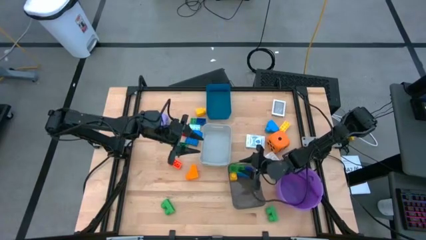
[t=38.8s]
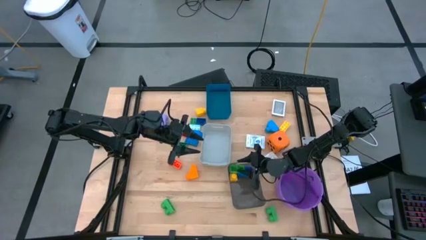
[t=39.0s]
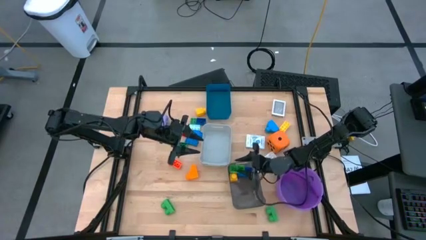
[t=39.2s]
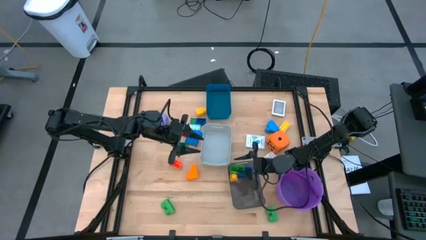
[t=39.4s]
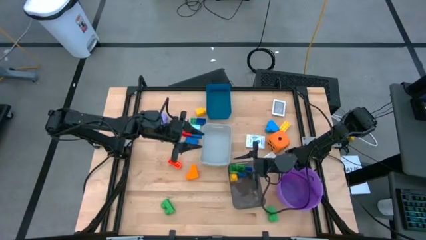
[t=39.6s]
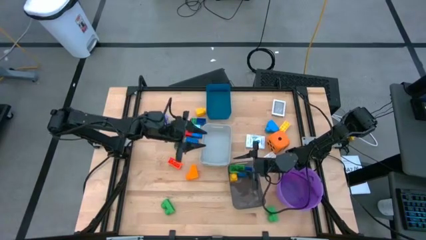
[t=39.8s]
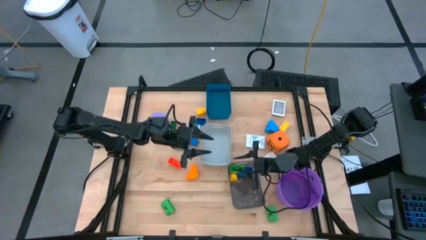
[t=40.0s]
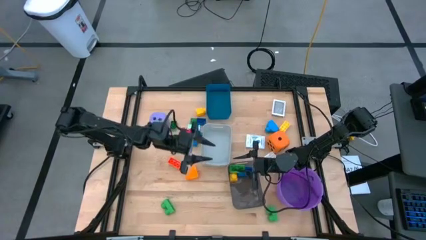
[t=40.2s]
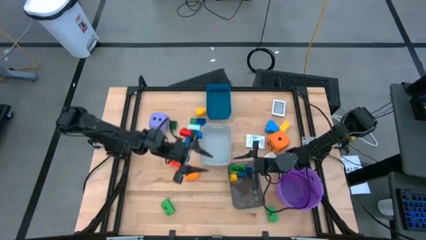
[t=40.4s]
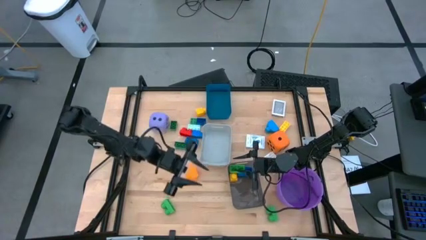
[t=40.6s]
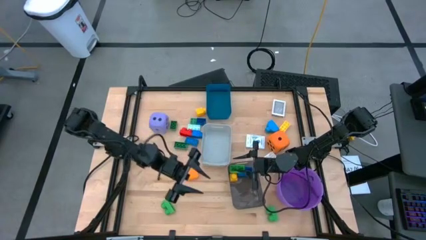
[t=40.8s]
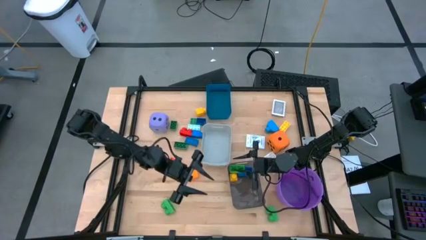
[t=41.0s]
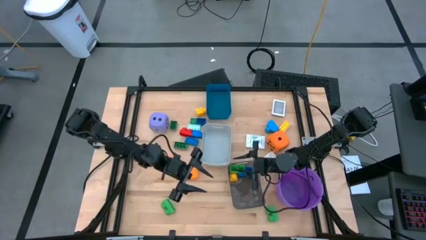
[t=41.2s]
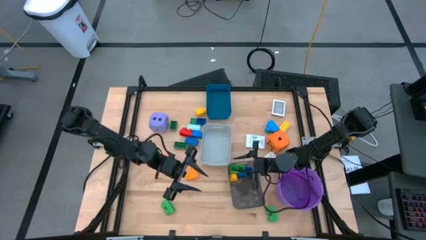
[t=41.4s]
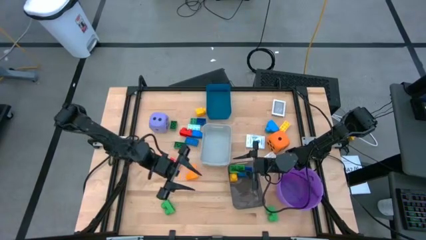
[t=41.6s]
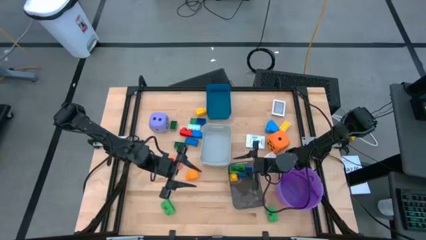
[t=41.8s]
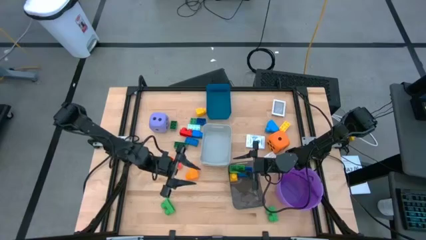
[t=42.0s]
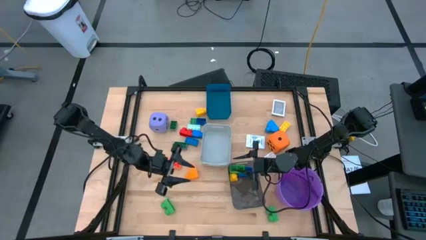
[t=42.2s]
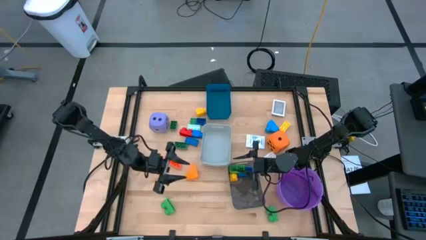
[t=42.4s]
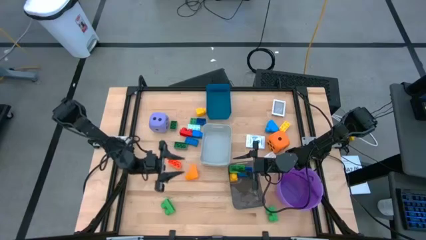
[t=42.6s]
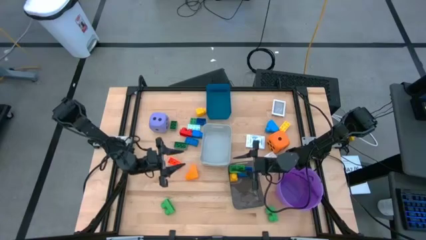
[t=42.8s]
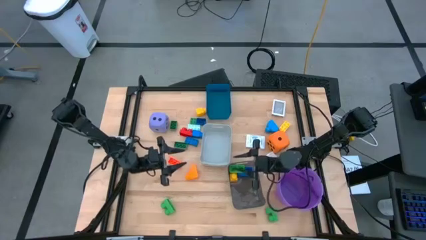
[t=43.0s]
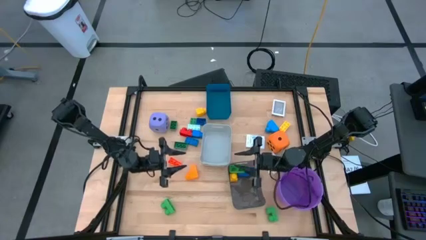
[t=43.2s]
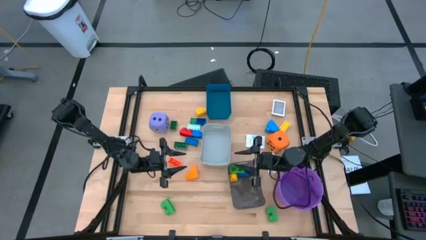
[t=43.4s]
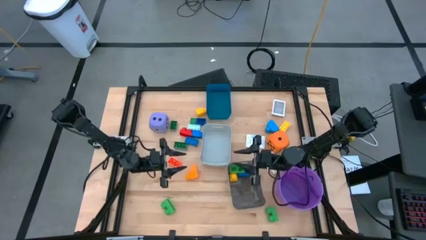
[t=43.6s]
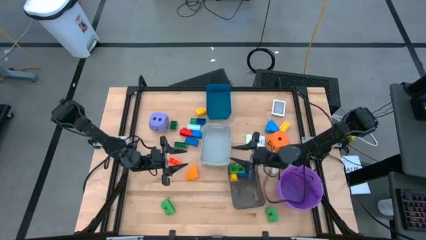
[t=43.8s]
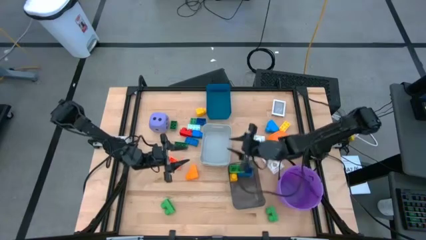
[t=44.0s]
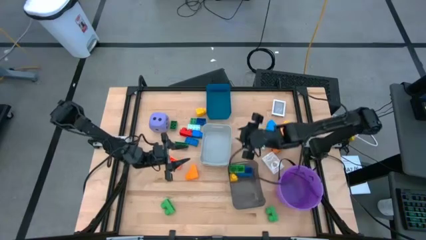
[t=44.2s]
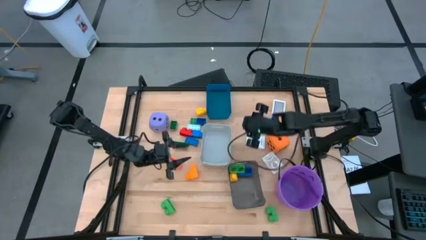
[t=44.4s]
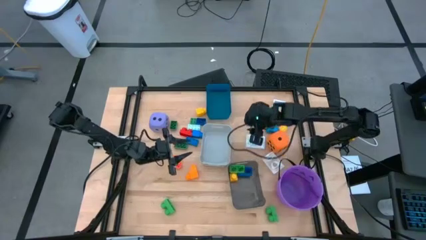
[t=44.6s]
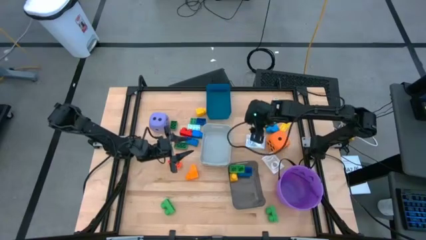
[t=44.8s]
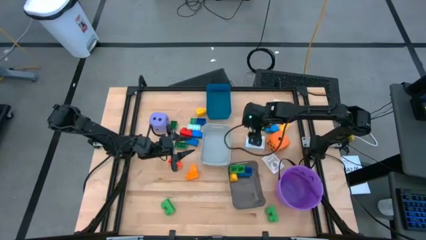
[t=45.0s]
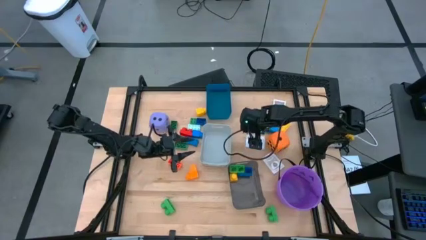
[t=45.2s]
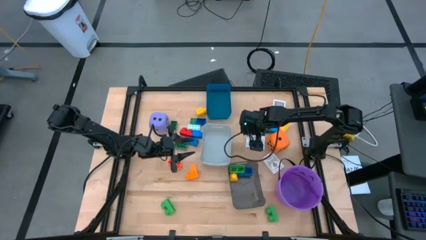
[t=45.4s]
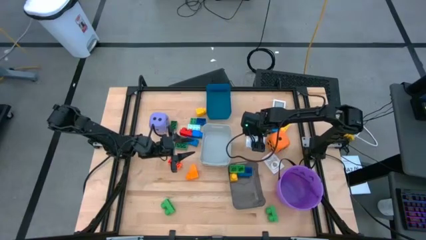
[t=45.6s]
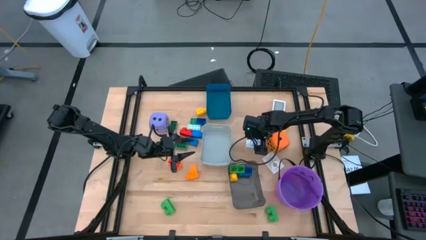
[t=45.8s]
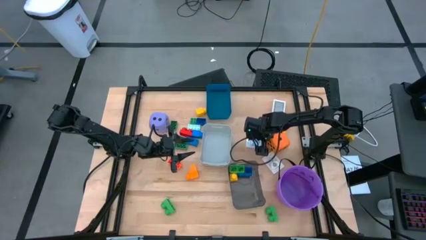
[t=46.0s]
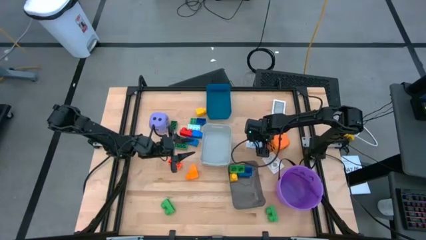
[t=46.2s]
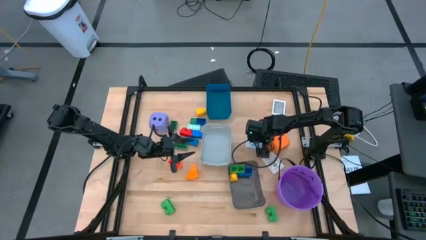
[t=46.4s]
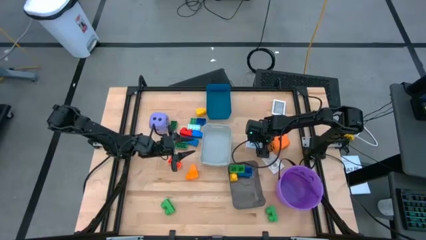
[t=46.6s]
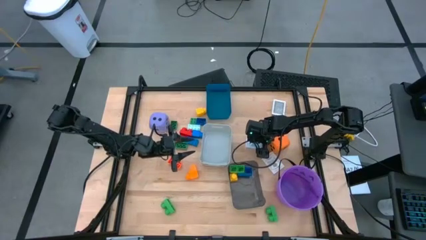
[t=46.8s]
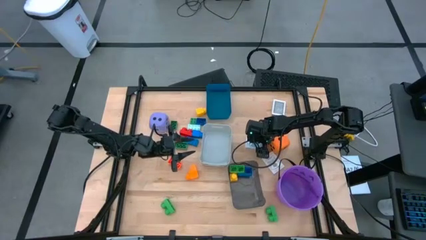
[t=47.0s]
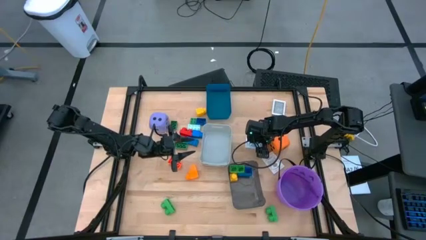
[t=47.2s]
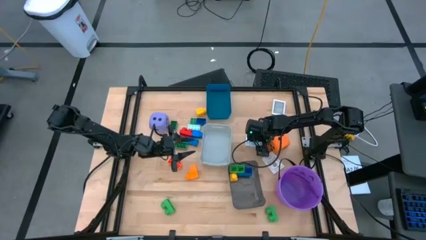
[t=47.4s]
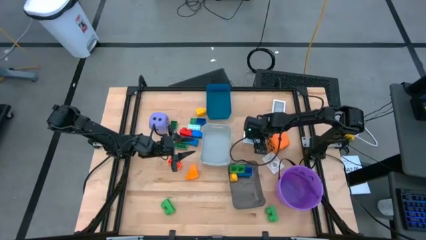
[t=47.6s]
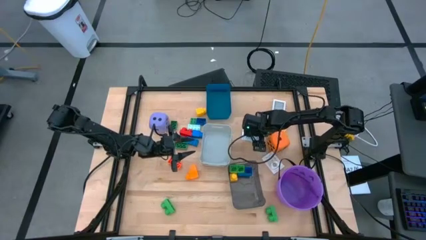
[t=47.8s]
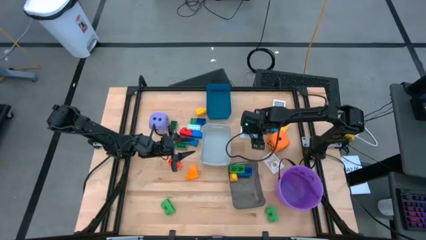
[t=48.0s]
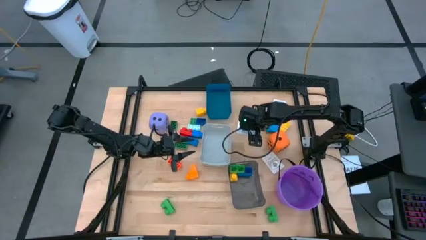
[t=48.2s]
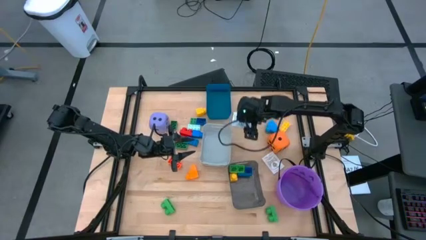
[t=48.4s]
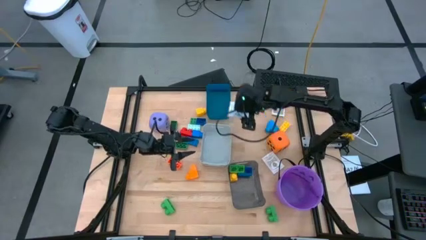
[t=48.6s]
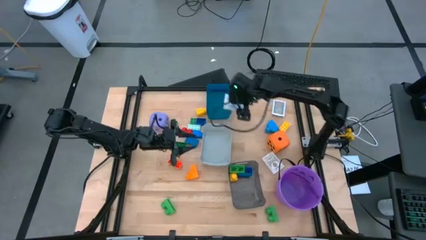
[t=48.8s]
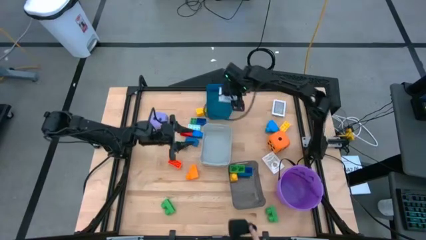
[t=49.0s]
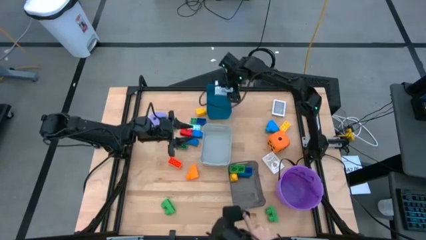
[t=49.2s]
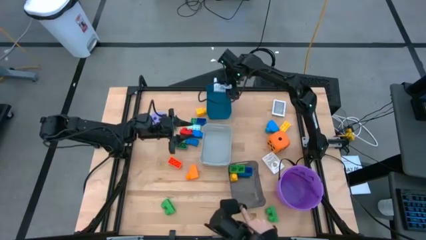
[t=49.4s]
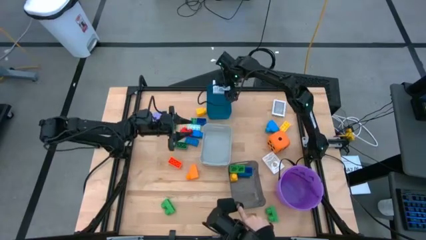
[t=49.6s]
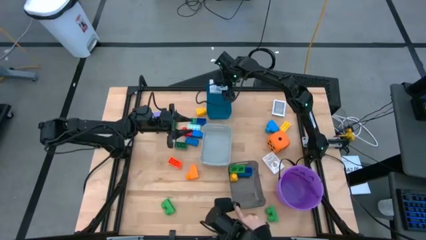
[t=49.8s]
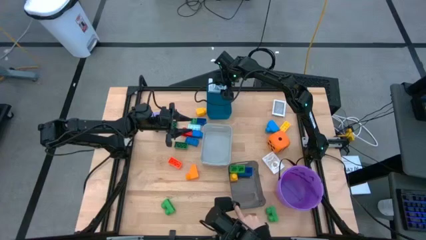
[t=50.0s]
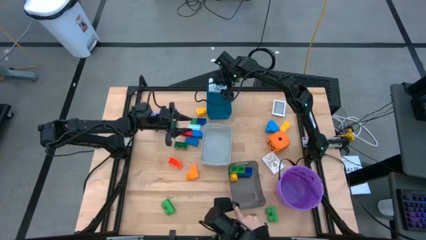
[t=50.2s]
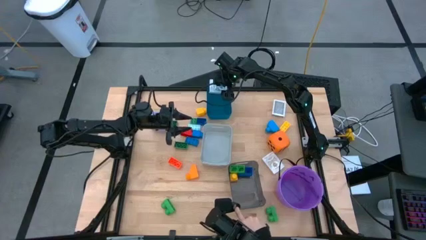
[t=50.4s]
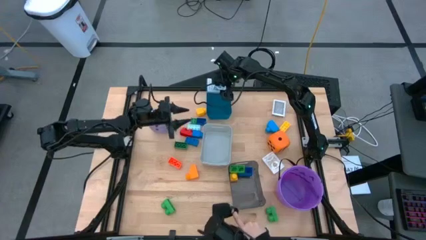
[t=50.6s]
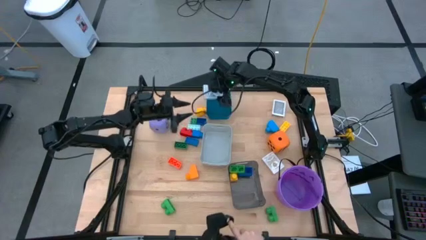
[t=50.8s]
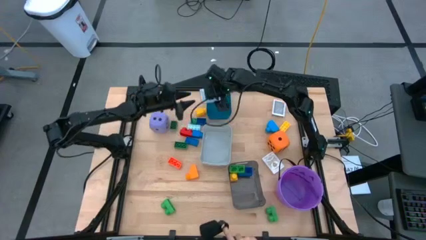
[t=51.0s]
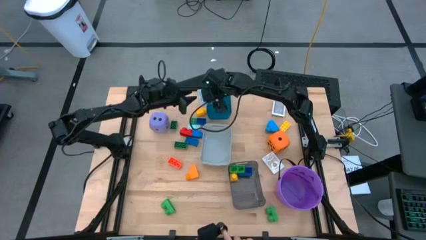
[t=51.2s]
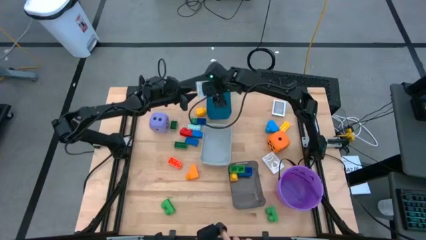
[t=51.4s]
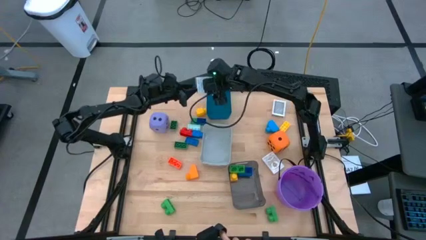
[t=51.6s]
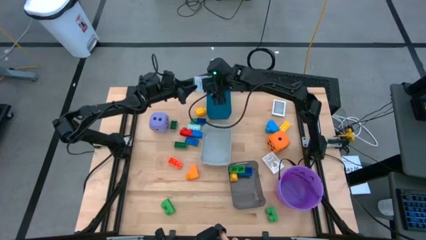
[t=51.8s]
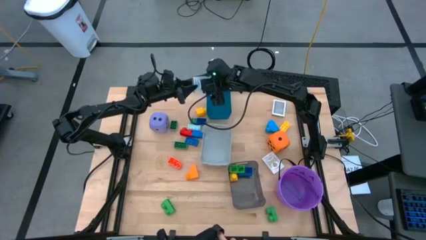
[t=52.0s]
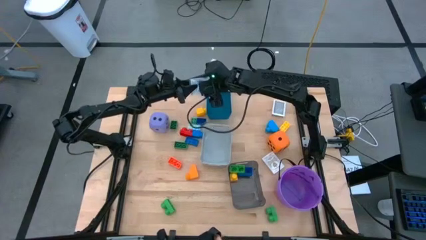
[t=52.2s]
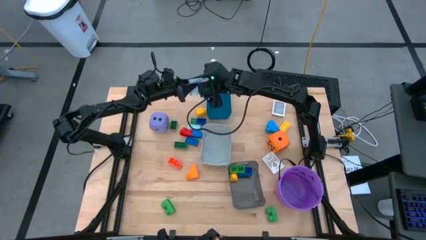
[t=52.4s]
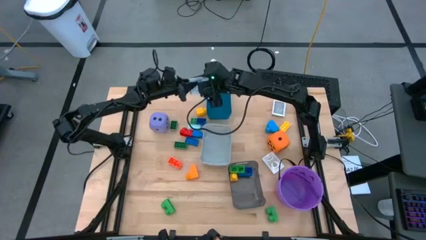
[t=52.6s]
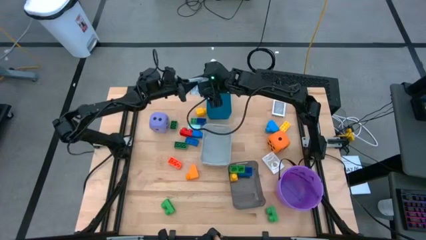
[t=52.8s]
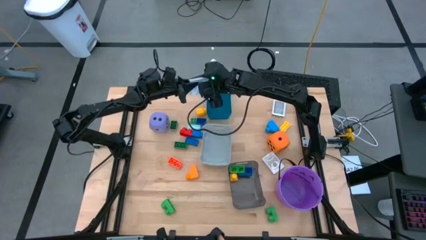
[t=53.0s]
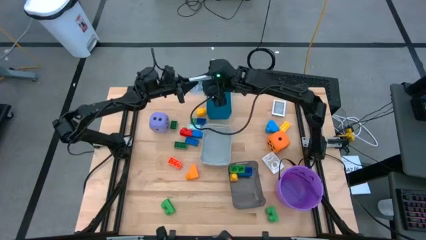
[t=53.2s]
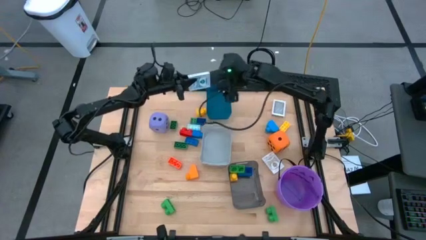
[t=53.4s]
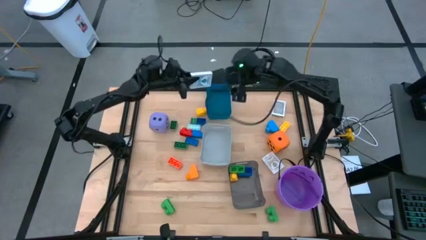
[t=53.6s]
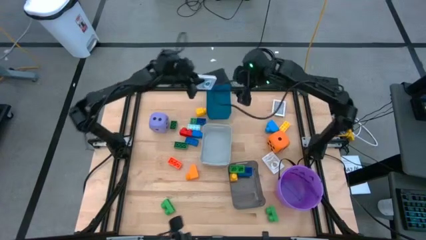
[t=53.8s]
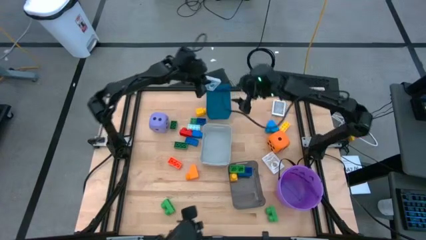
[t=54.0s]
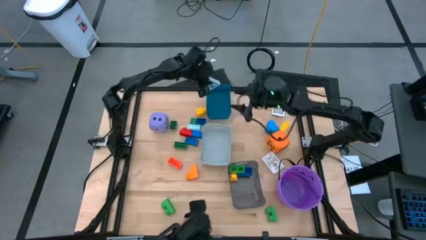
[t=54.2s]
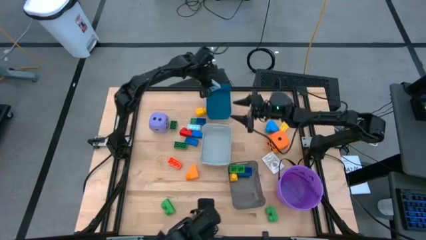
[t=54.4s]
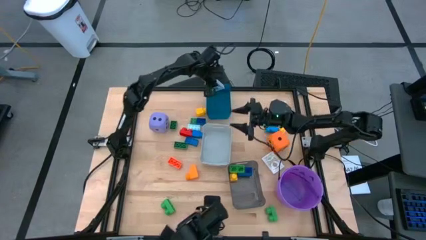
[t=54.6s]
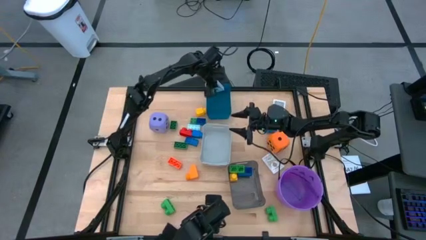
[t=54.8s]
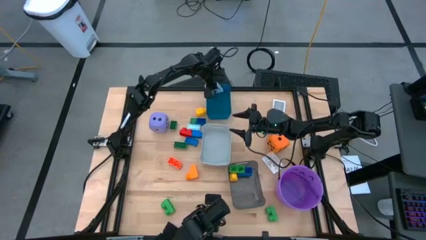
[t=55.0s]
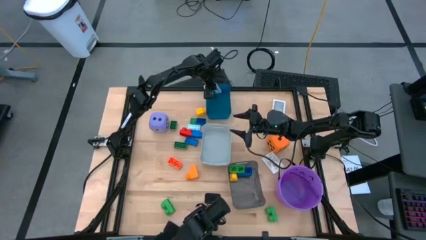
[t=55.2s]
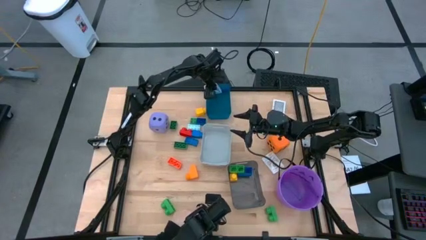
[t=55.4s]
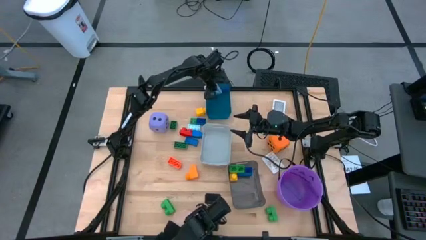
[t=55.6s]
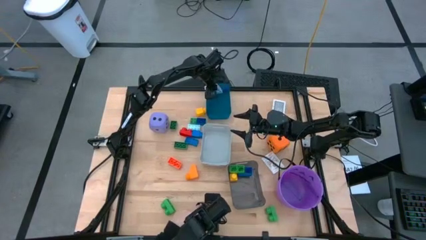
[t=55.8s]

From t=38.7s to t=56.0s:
Task: Pick & Place Toys
Put the blue deck of cards into the blue bin
